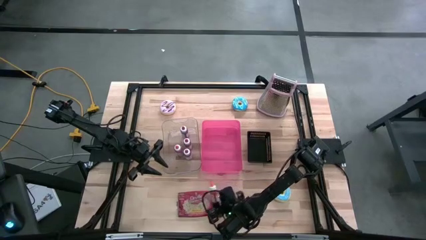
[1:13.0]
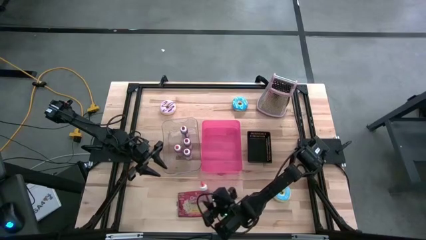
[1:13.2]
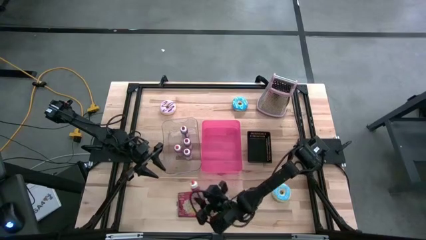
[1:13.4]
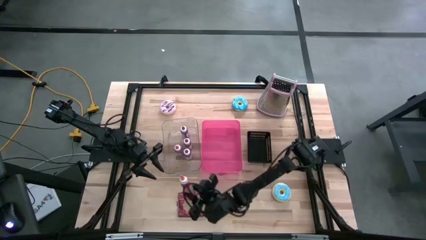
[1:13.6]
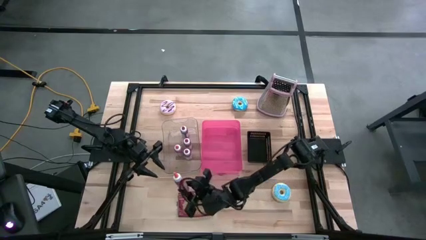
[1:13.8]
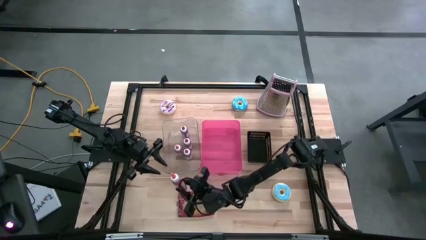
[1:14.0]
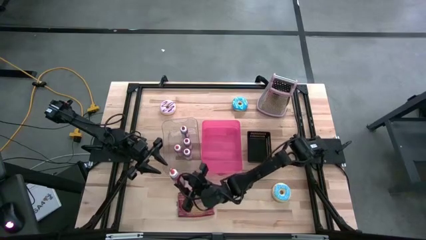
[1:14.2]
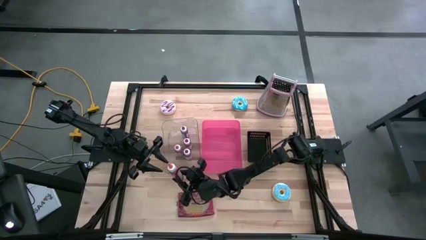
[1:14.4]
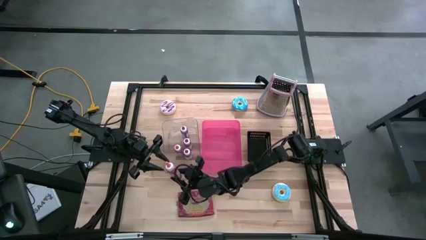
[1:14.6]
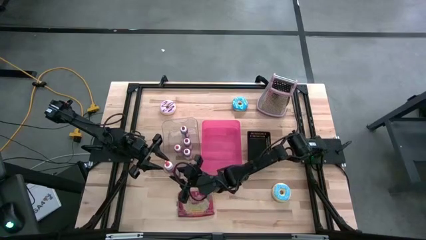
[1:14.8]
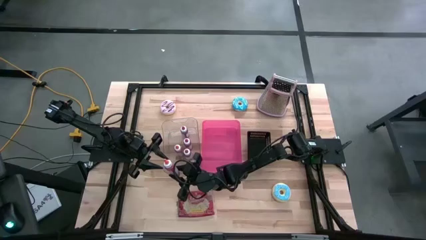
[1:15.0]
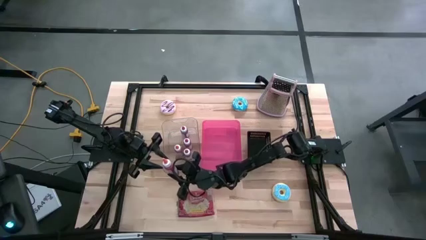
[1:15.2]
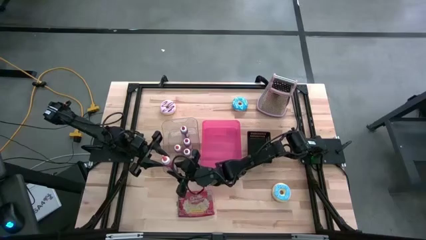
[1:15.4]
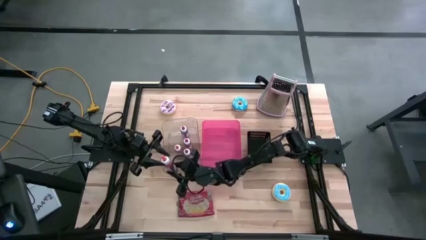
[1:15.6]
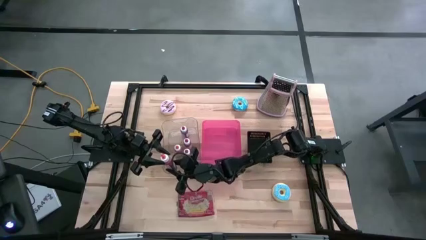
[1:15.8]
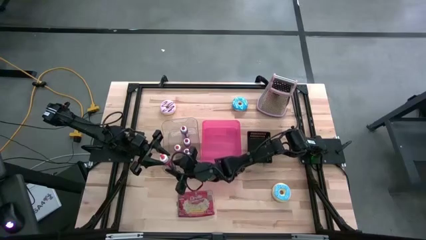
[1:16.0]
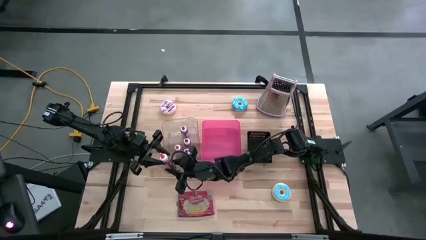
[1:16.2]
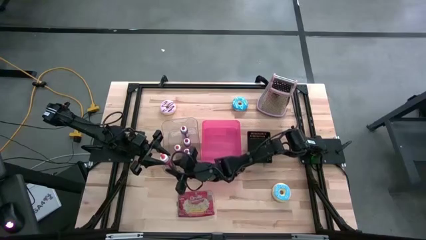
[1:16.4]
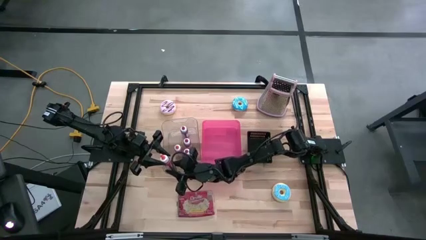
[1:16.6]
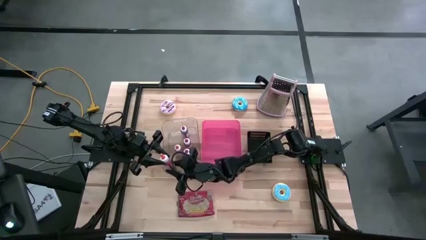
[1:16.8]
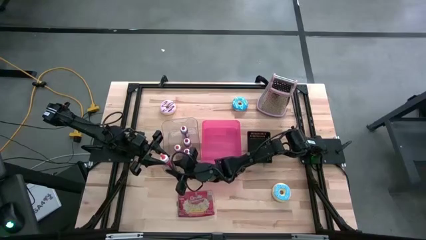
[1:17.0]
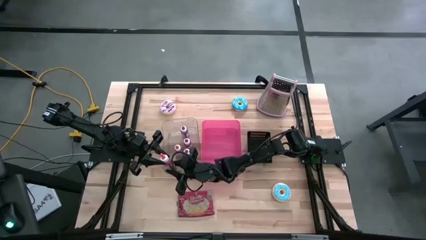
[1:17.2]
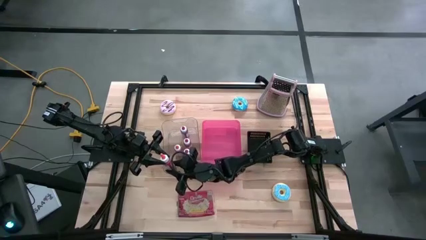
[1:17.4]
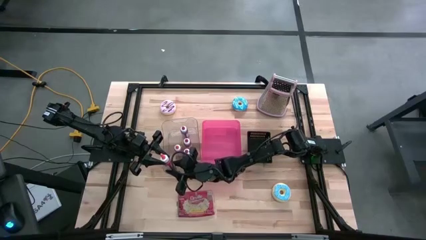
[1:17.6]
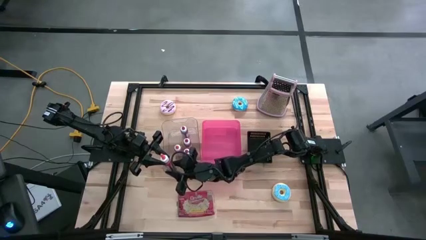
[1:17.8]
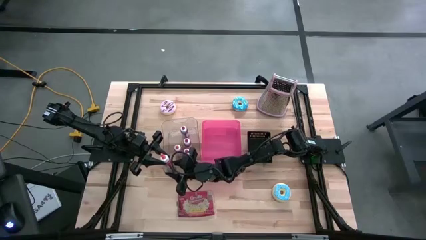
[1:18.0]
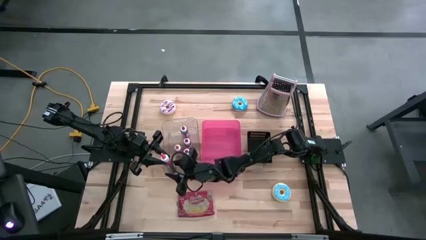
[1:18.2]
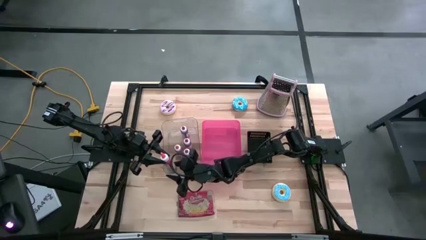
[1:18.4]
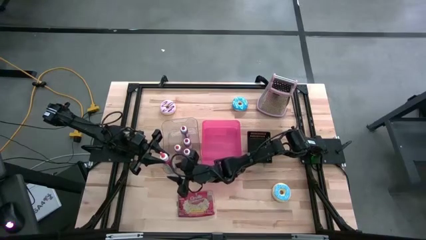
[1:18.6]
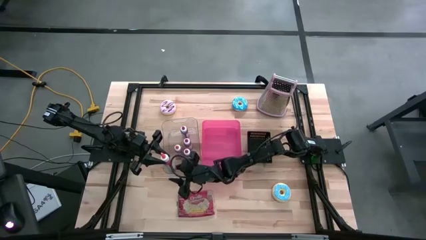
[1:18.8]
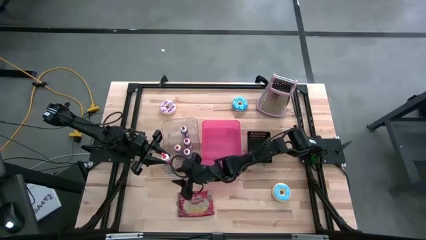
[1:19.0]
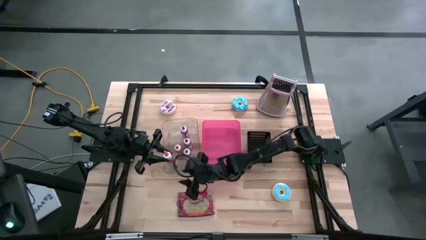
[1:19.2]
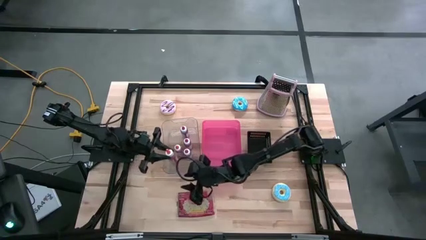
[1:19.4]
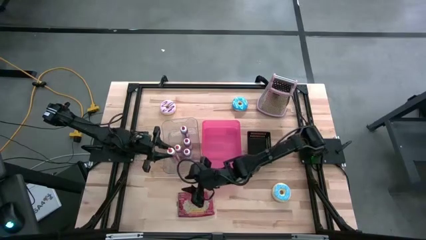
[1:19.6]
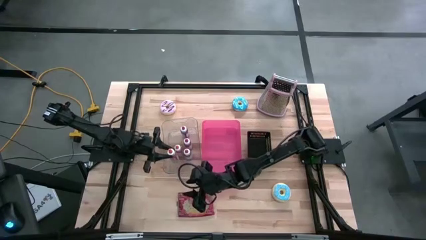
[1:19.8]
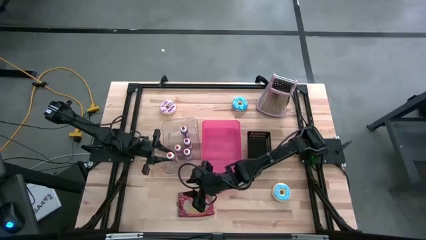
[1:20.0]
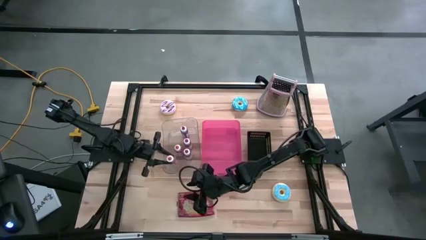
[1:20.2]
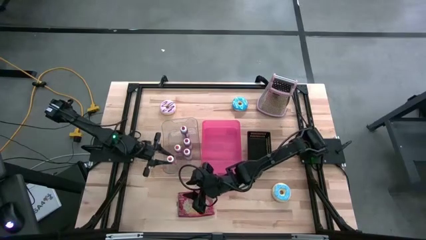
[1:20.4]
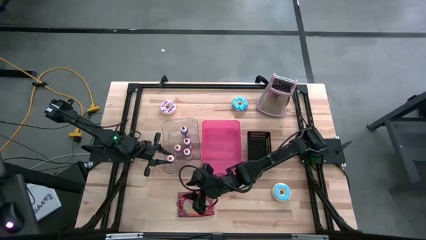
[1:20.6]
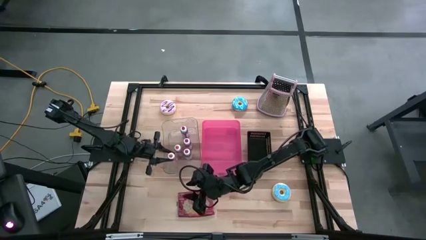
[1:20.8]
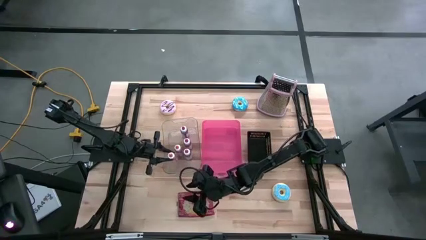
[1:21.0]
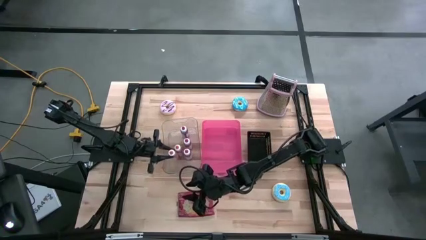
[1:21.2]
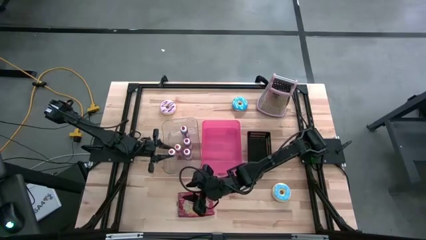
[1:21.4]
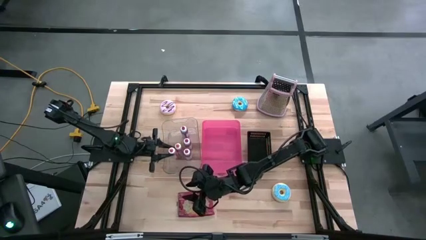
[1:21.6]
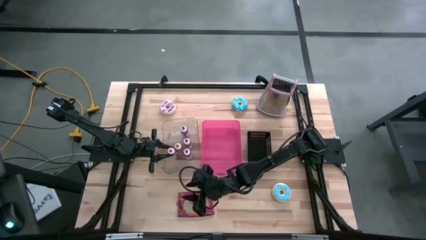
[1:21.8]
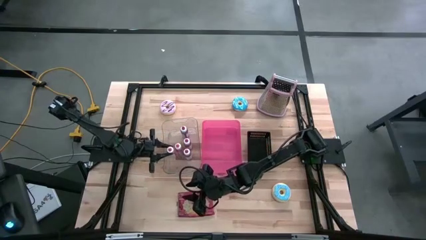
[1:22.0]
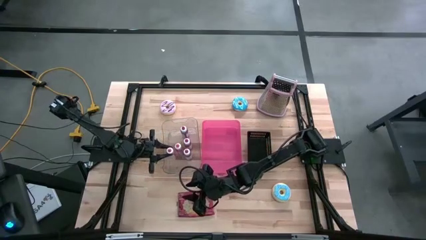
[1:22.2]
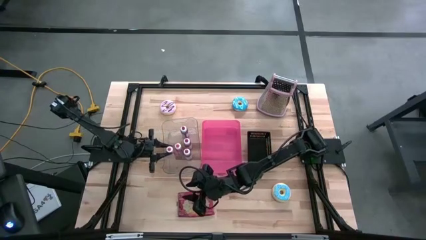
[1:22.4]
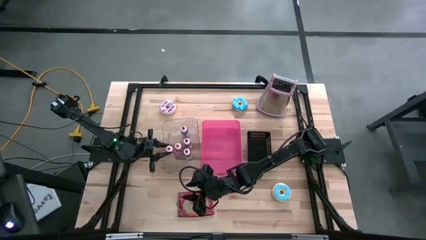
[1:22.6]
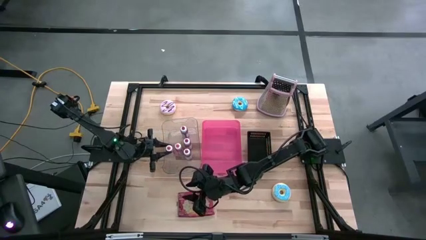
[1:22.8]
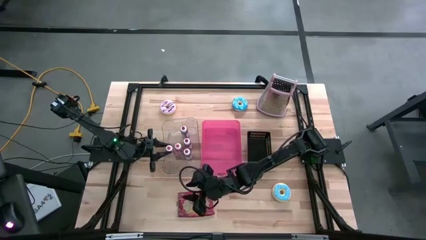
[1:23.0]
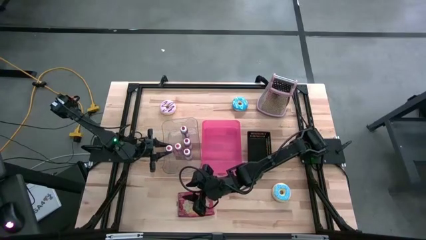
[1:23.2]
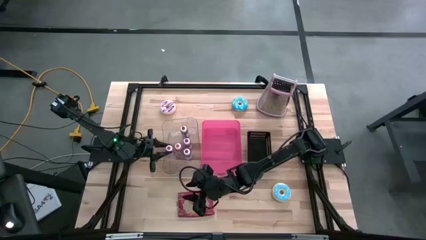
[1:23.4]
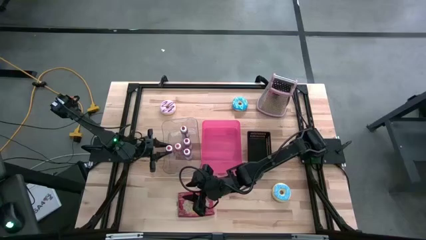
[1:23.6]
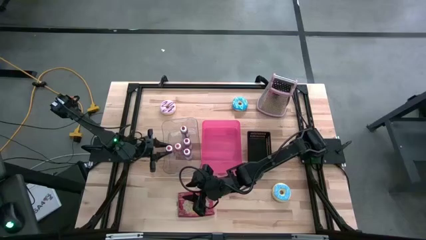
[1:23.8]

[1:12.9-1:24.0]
Task: Pick & Place Food Item
Put the orange food coloring bottle into the transparent bin
